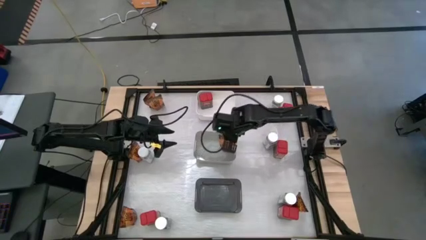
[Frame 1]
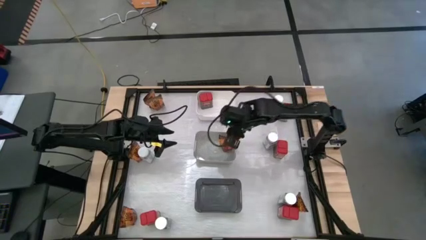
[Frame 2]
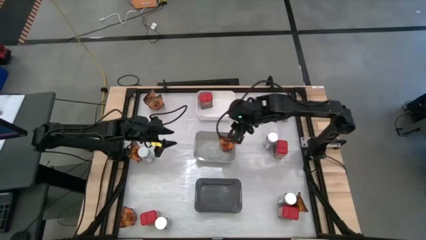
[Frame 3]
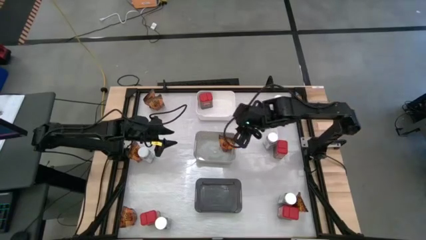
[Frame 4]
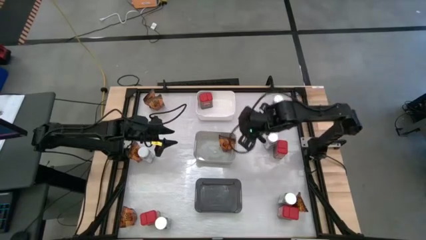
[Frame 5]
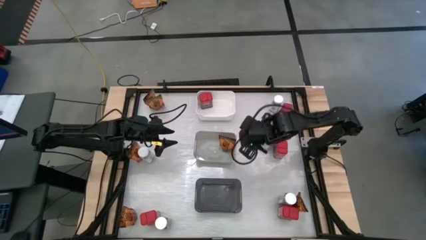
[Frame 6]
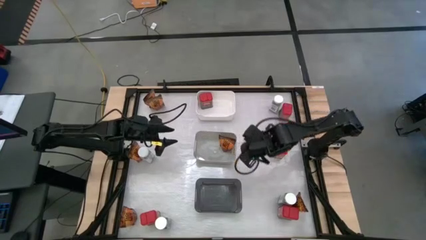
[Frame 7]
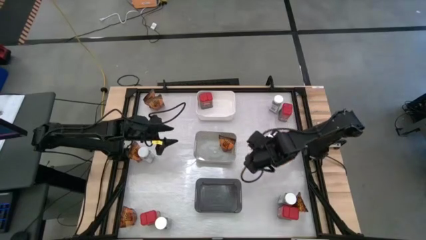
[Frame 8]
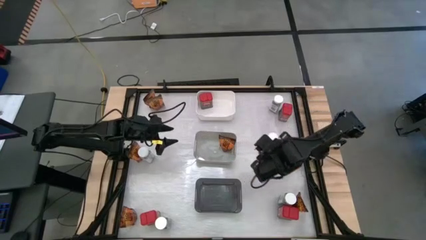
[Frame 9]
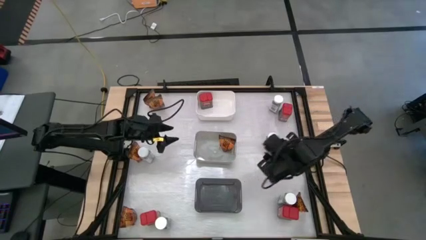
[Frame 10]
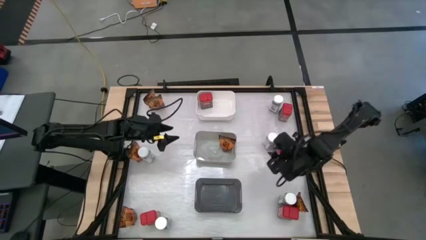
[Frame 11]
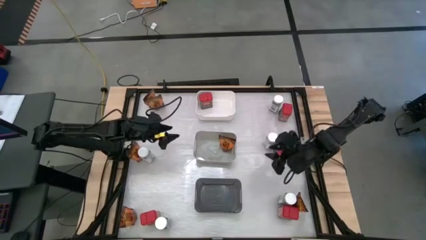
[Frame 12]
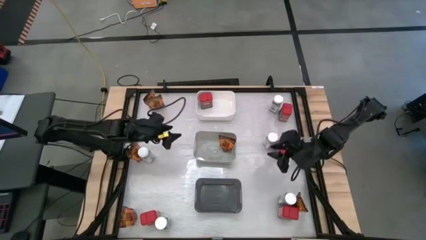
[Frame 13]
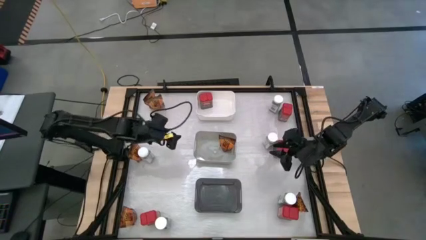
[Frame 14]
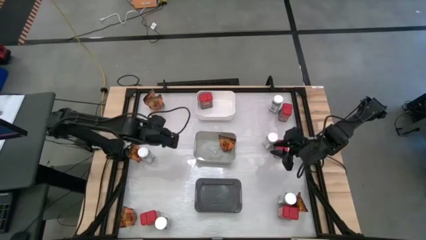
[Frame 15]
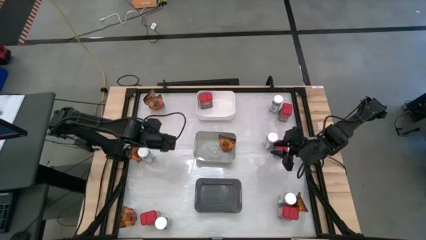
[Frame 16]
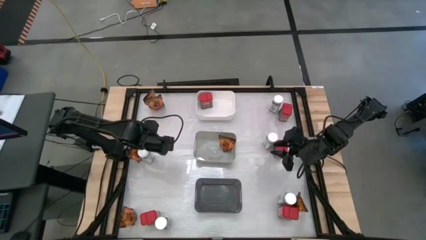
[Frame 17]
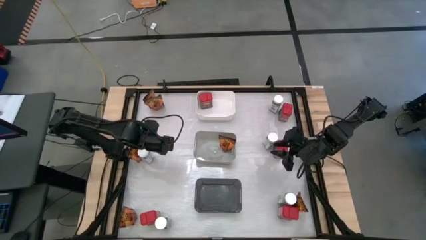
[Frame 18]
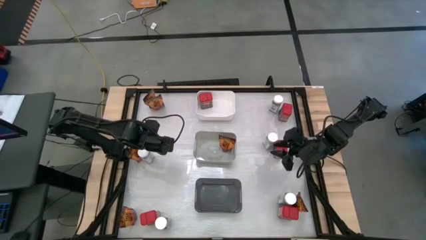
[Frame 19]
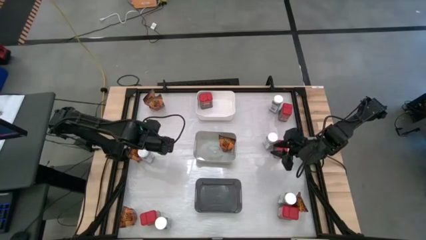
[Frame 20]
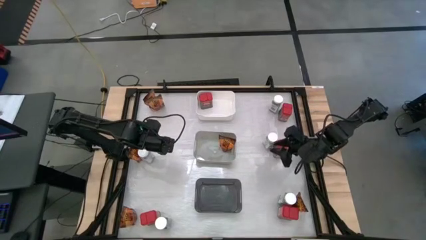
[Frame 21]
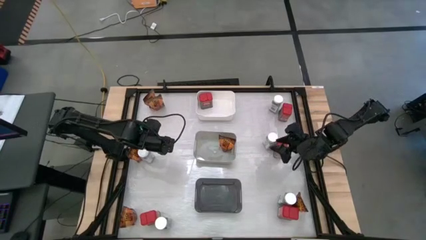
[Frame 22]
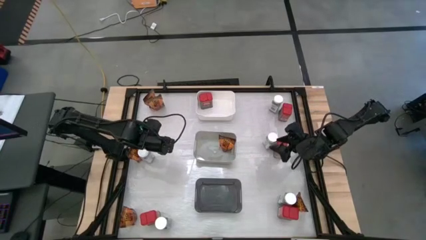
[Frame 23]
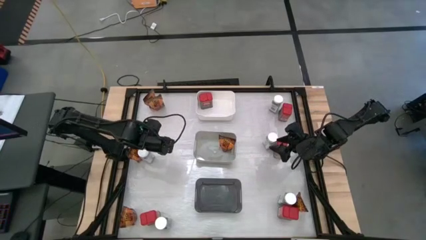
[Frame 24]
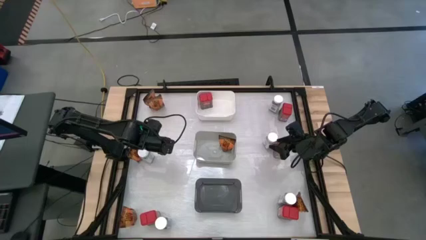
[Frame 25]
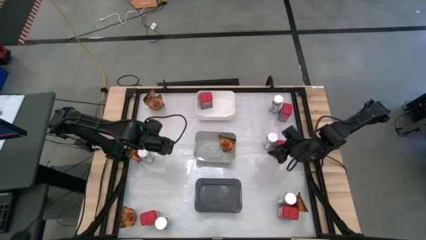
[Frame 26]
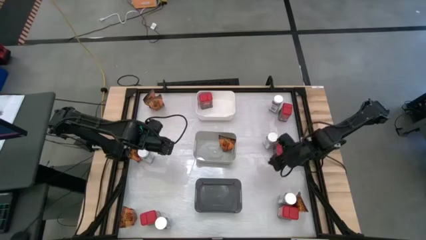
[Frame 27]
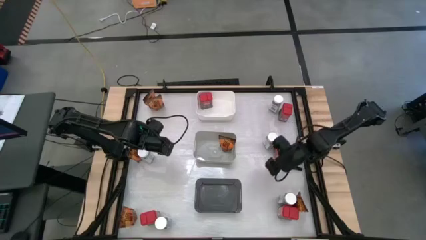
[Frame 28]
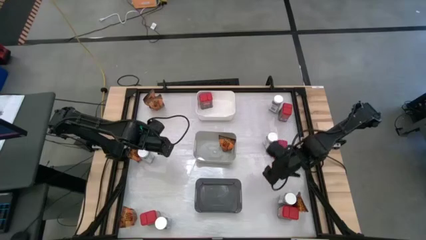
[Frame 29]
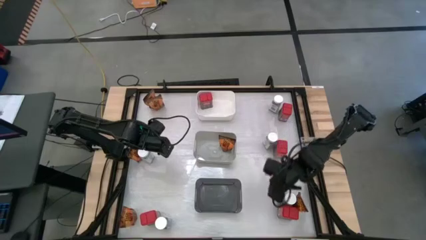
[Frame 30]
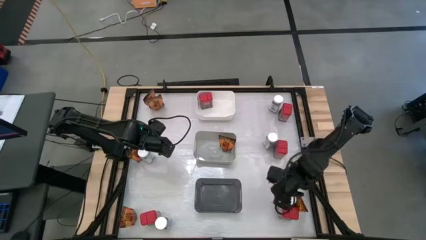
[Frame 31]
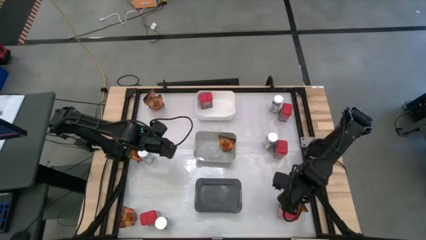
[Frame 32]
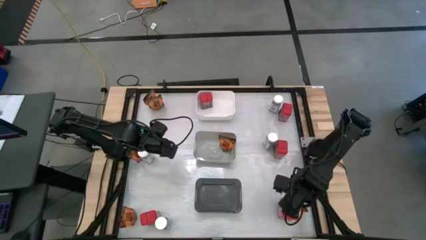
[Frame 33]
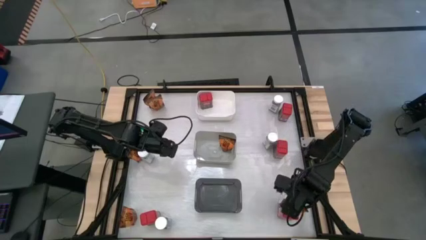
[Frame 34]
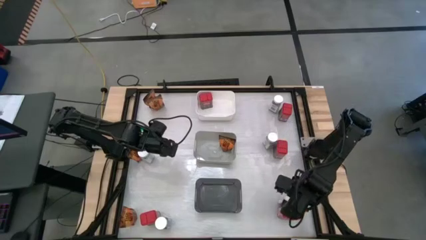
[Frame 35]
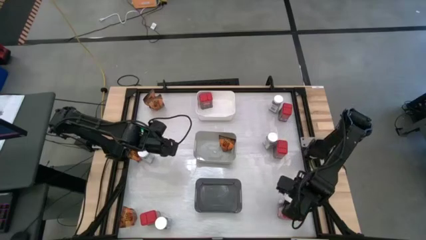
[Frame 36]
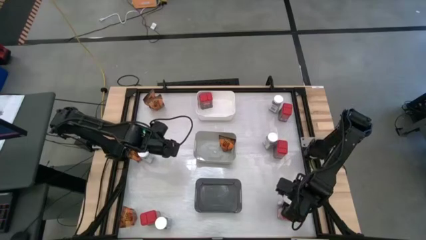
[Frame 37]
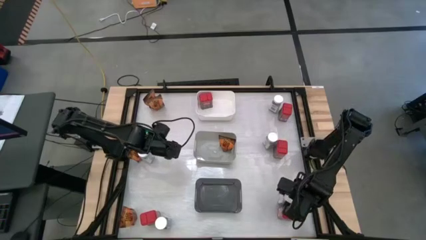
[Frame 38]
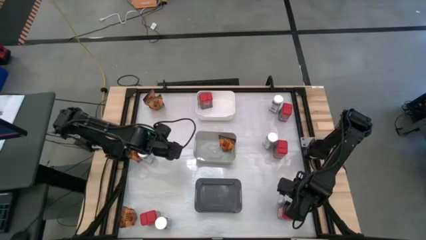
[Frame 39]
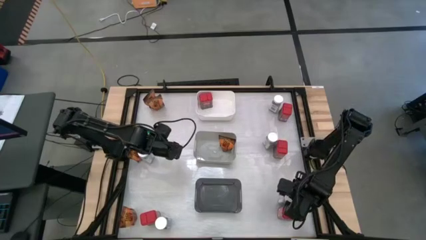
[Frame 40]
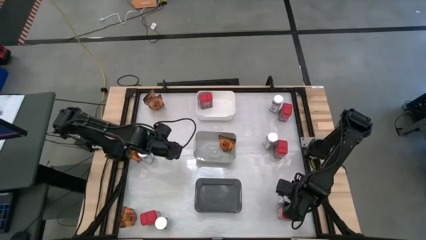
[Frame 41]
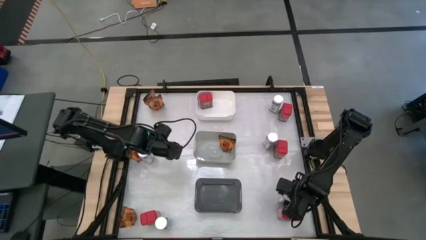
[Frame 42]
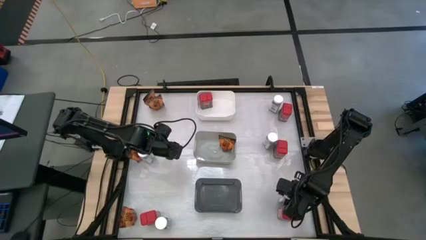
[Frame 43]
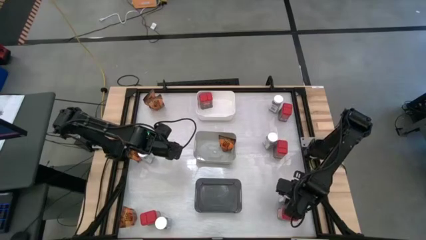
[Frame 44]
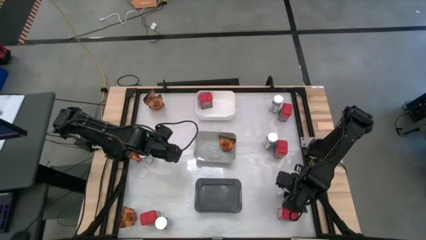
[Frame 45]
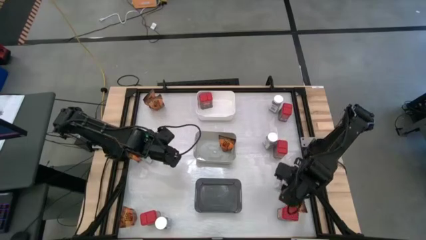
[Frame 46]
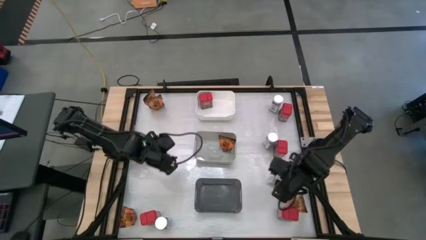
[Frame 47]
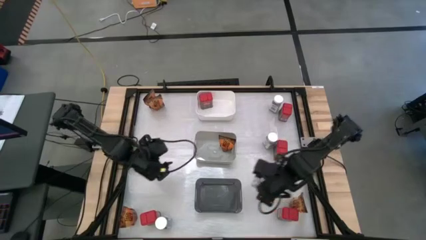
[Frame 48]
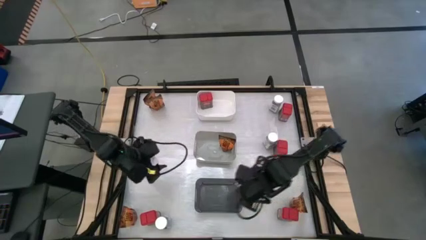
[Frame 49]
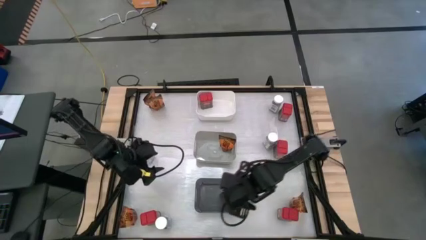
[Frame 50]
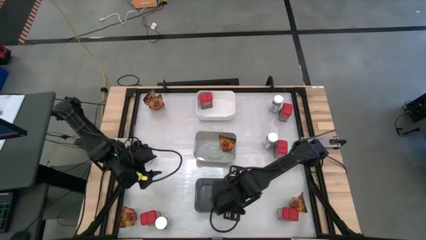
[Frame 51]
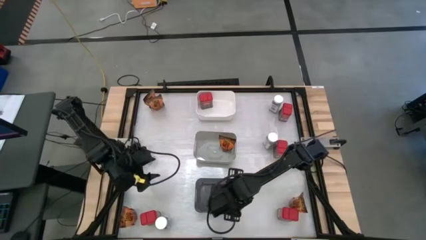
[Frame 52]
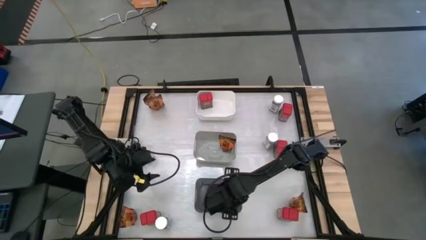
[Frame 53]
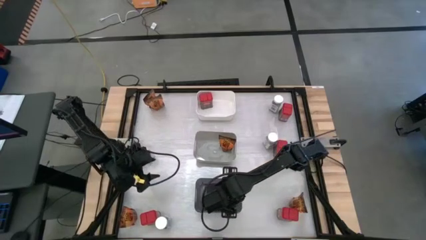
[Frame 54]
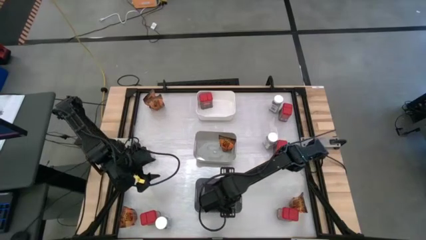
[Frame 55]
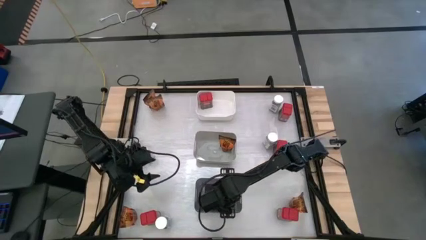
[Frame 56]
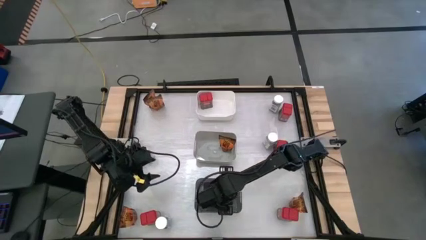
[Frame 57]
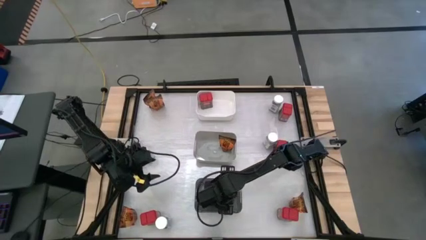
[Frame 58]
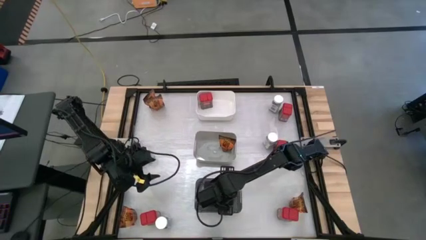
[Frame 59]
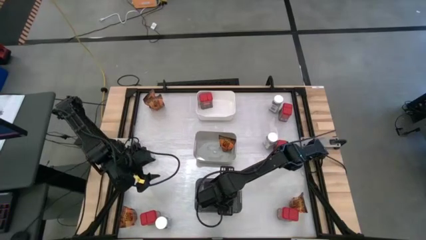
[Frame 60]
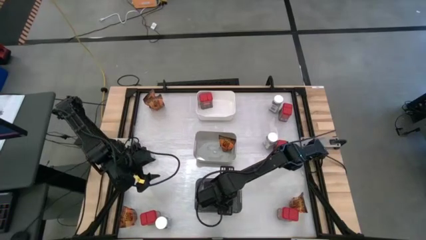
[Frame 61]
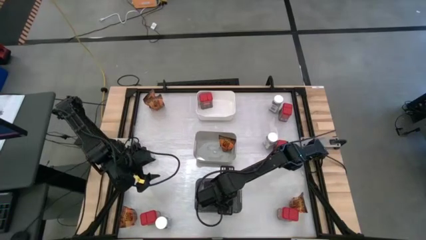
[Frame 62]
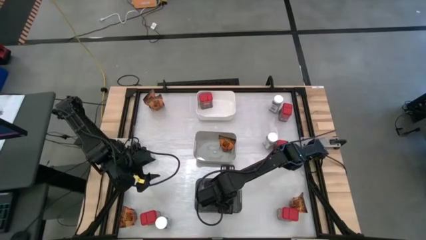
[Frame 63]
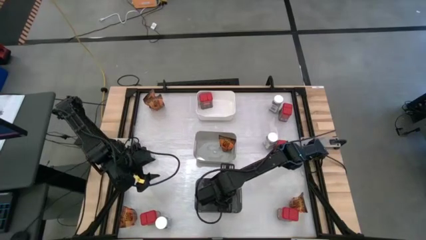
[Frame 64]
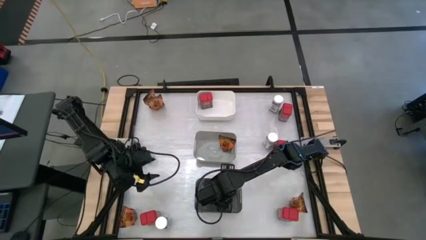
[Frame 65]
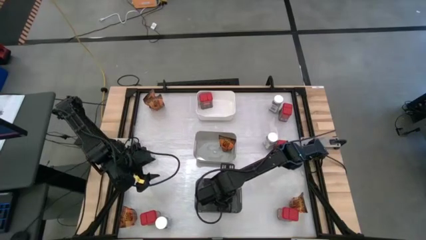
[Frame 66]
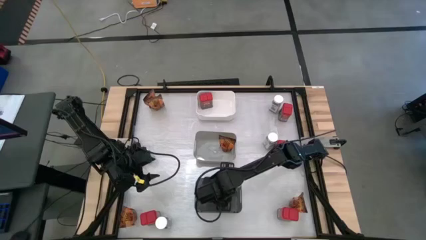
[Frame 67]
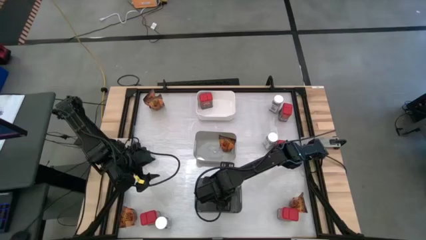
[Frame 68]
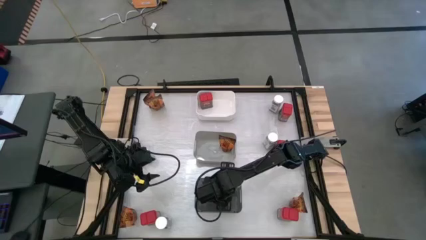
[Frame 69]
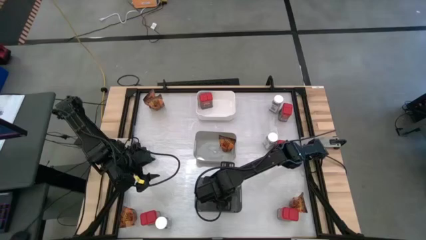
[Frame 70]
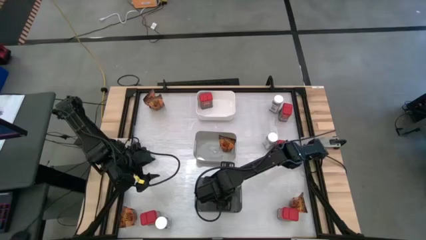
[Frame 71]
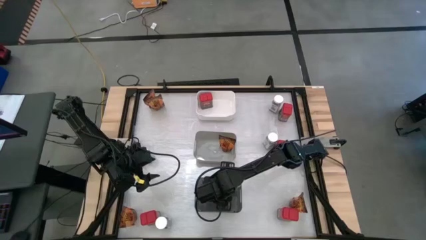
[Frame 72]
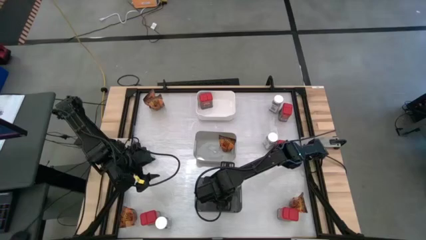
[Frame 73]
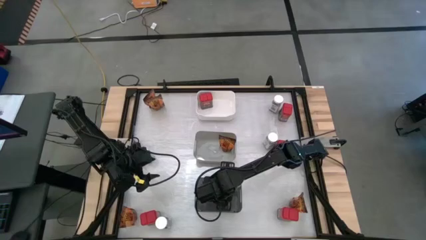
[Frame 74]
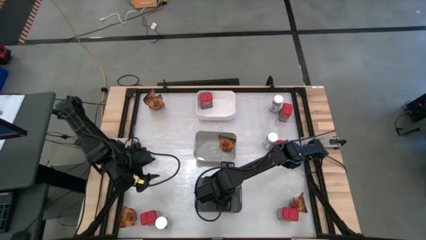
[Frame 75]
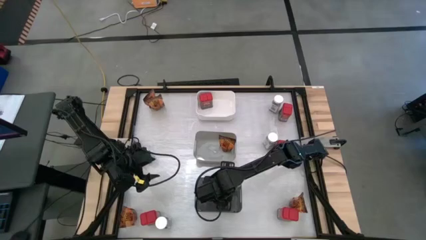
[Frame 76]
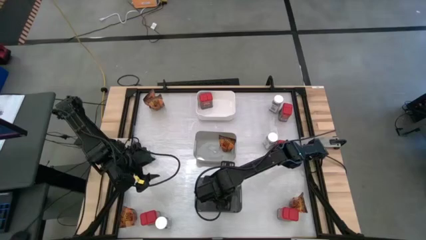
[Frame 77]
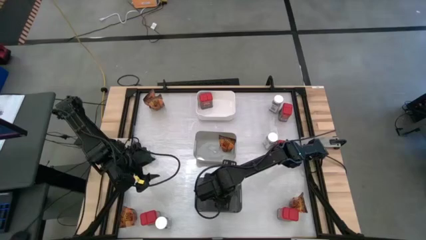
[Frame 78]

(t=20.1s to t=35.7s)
Task: Sort spices by type
Put the white seasoning bottle into the black bin
